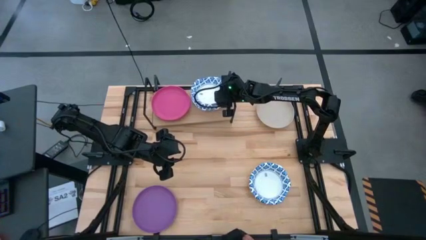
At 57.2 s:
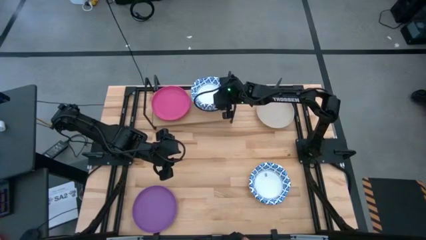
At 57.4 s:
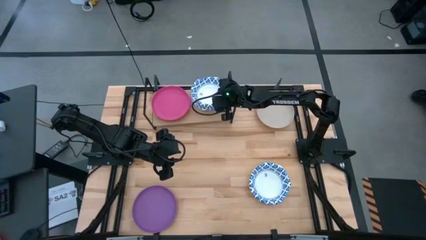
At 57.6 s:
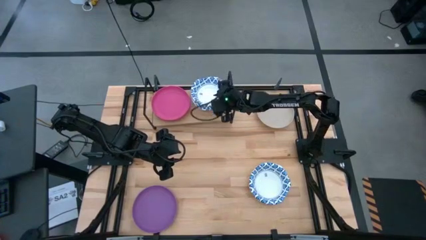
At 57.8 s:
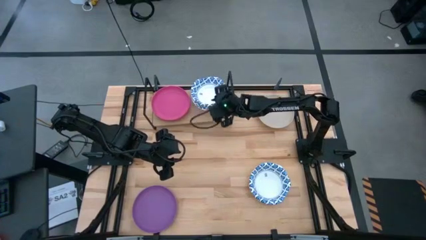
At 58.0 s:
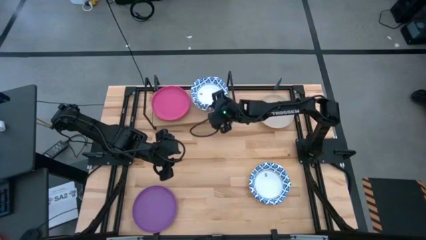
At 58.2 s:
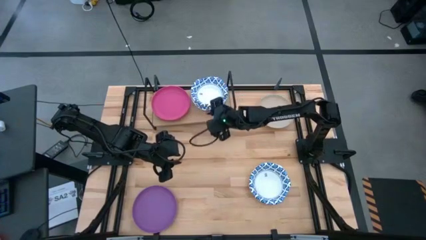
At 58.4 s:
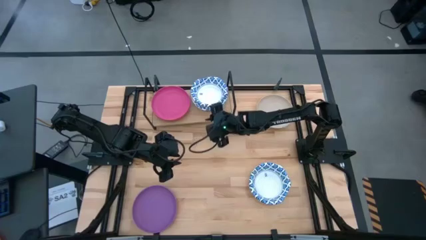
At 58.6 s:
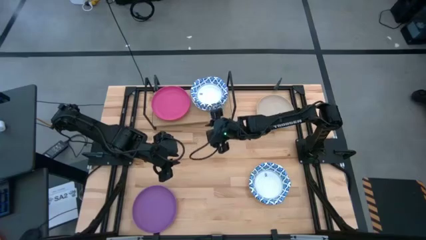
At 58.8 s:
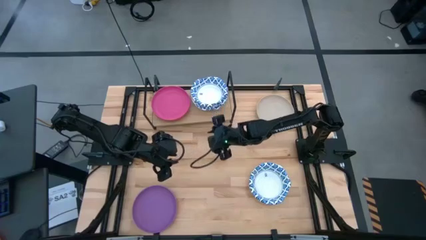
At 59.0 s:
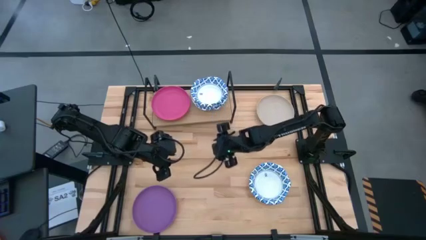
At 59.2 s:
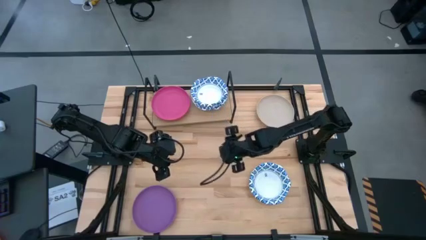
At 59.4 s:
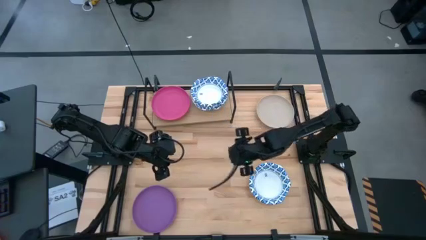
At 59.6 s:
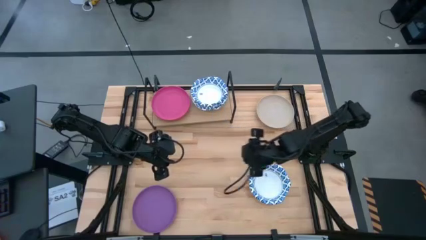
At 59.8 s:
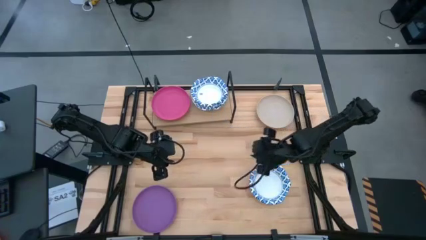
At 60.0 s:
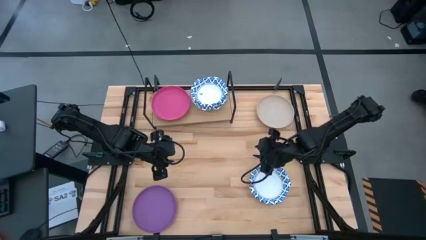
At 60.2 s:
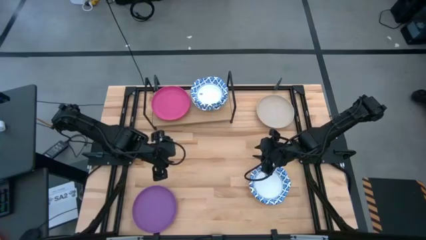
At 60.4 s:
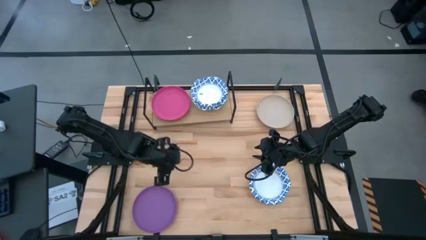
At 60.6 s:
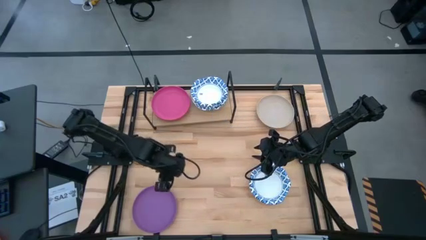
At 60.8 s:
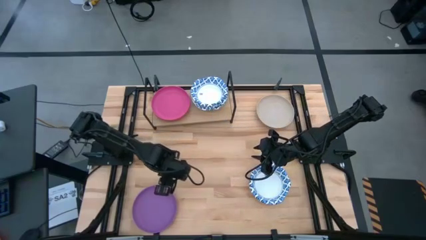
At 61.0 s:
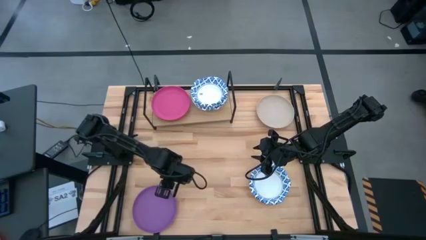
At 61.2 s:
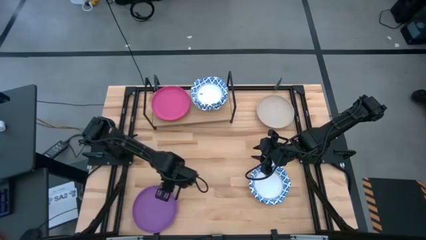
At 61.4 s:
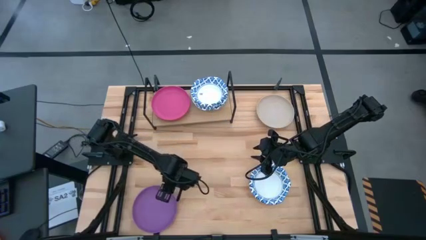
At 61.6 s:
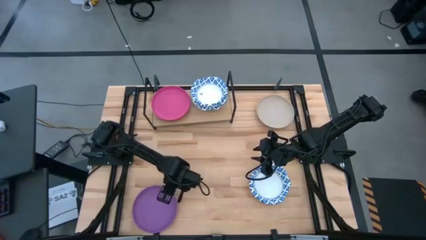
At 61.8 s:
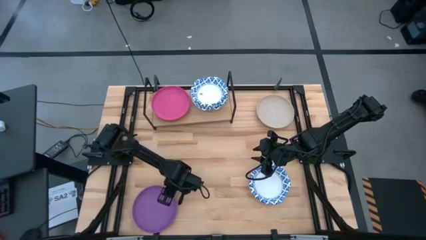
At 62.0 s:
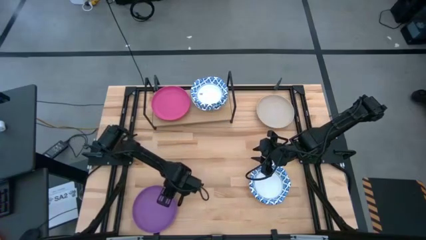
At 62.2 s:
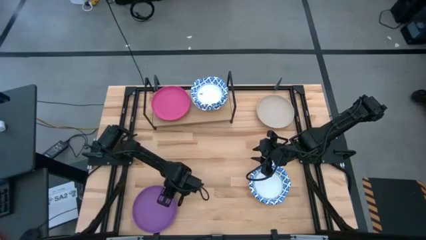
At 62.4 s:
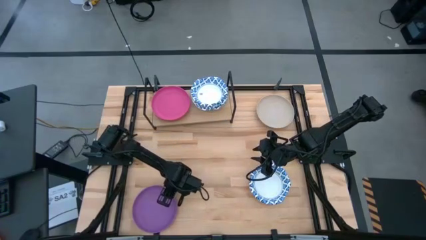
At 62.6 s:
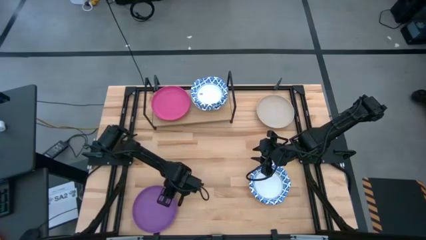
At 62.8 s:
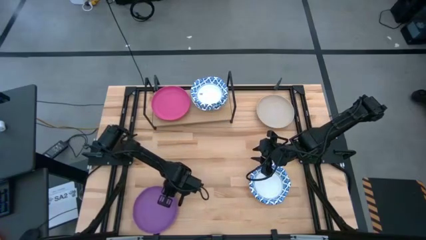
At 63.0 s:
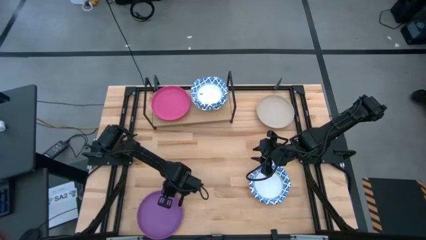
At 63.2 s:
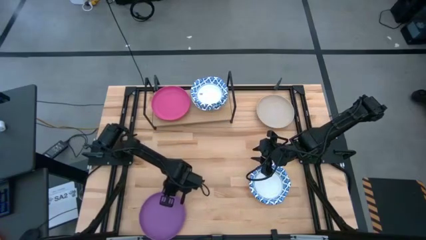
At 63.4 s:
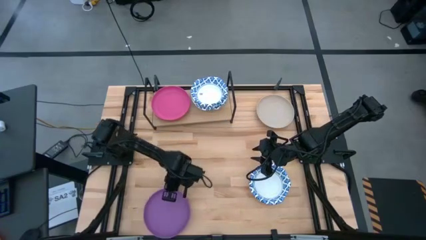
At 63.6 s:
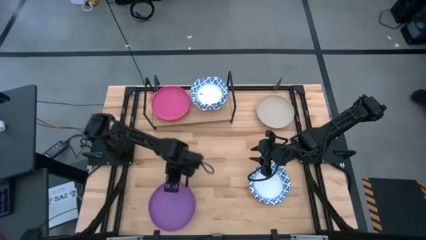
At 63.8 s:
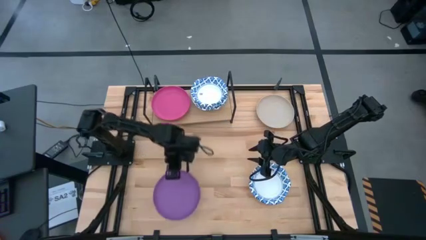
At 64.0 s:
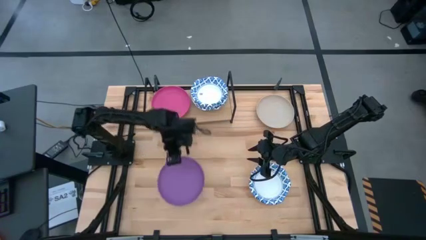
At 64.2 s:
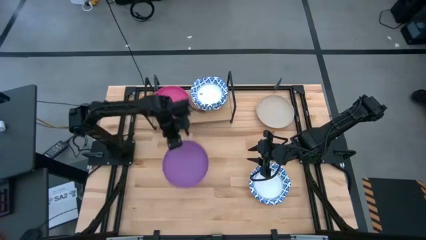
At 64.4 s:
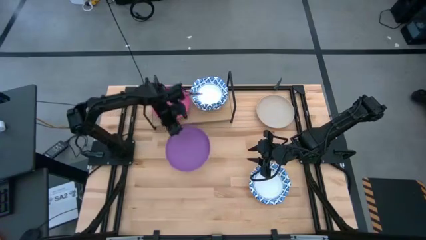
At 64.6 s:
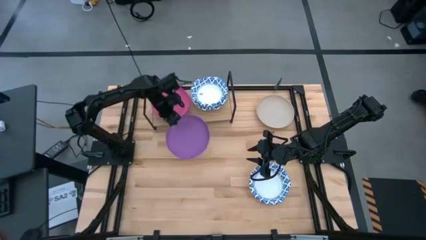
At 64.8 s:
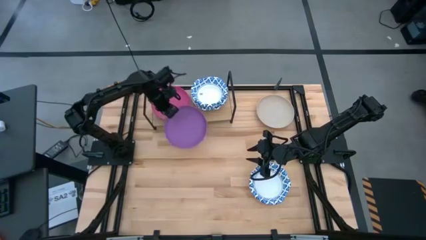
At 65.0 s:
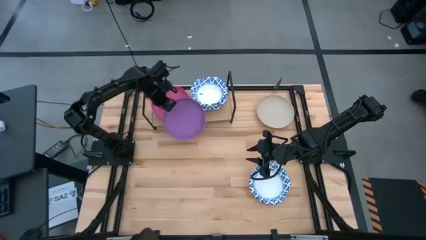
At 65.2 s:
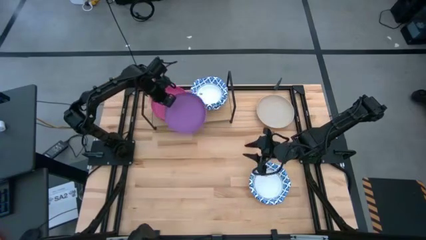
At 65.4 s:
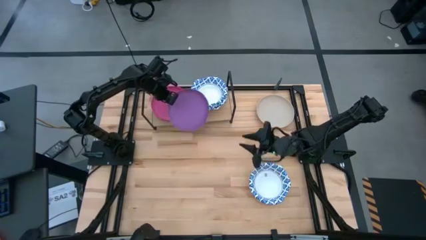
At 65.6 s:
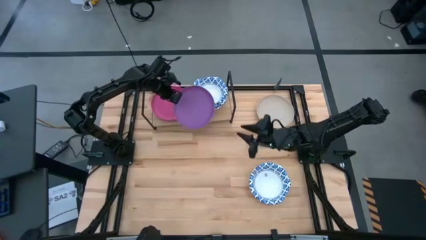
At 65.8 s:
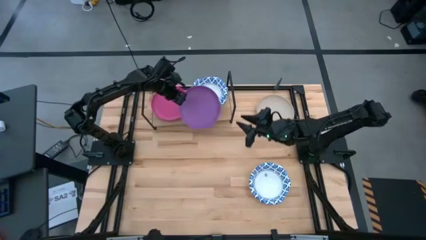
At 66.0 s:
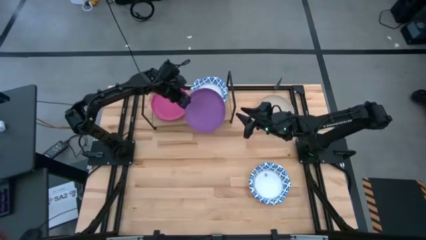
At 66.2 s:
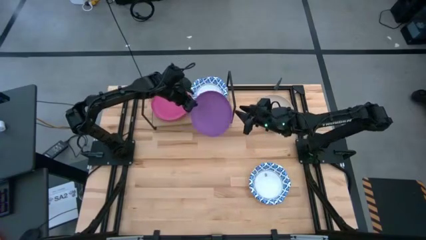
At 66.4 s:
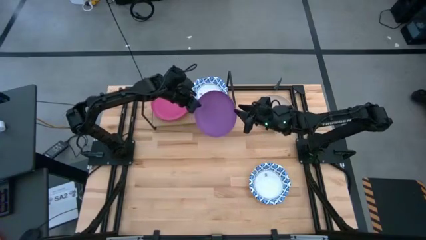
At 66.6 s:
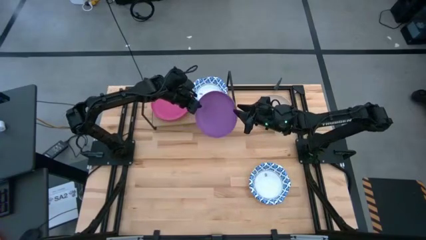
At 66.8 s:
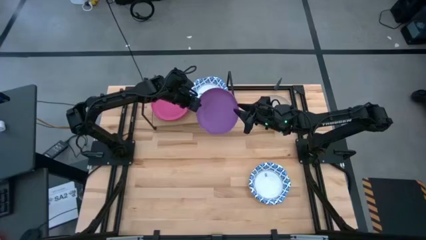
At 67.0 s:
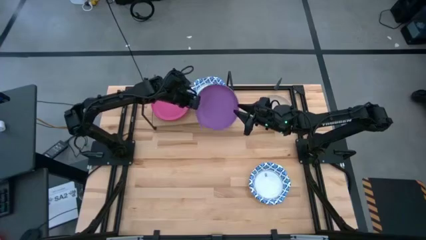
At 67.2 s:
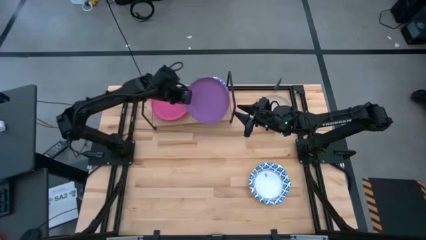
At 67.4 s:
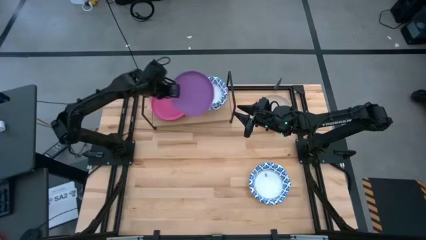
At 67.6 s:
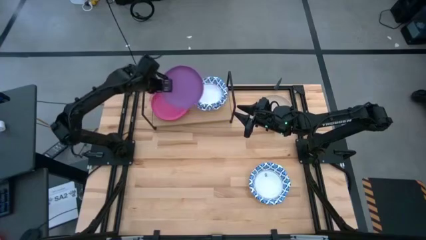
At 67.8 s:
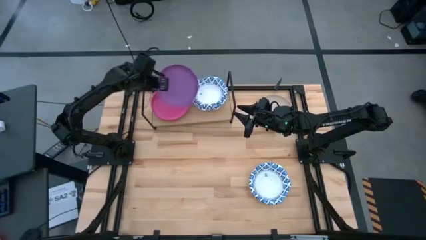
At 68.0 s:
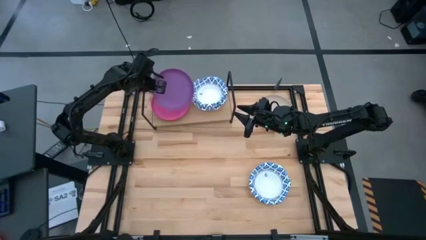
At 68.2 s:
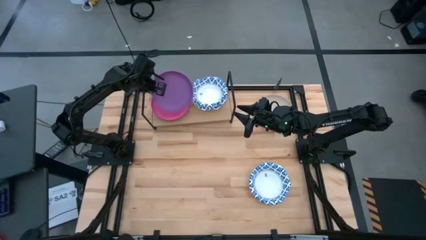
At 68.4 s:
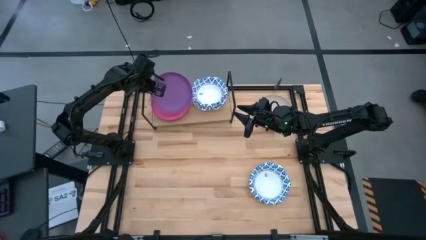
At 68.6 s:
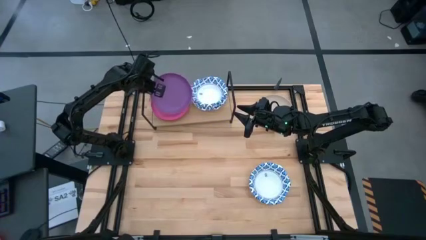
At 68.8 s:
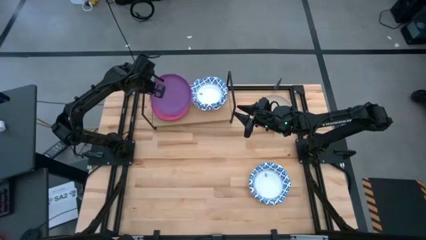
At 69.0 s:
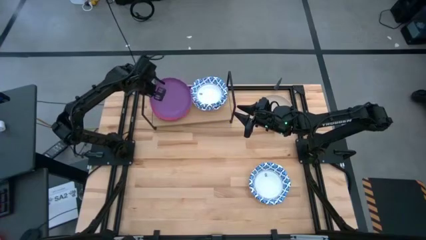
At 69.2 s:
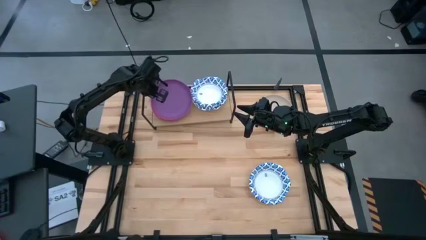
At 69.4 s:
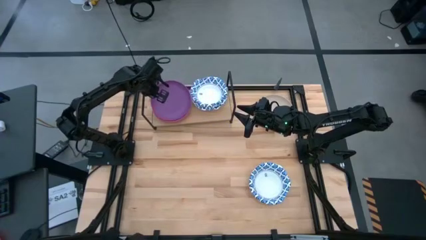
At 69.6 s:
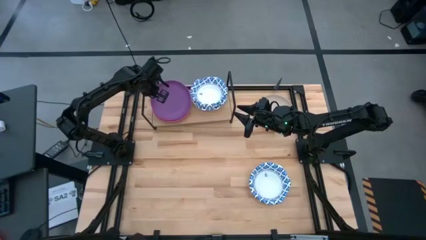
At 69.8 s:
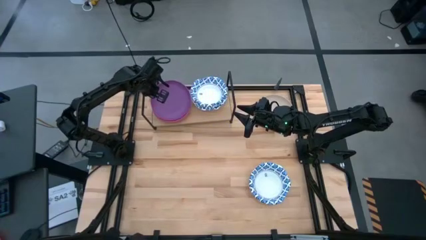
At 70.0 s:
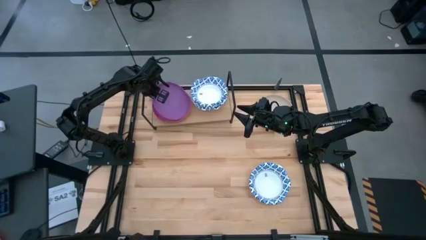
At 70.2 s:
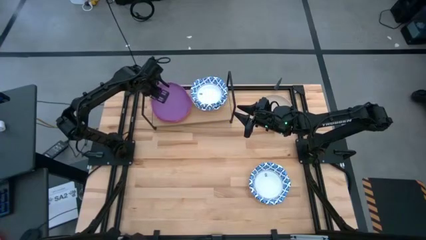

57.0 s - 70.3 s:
Task: Place and stack plates onto a shelf
Stack the violet plate on top of the pink plate on the shelf
